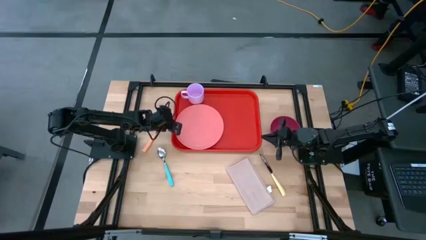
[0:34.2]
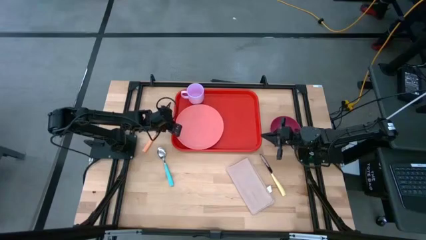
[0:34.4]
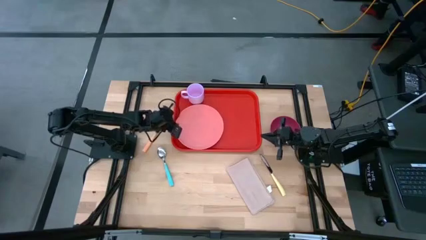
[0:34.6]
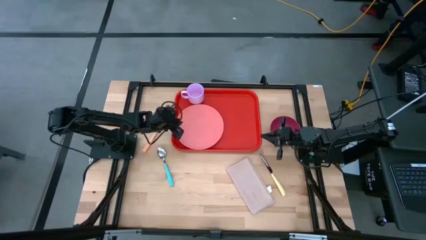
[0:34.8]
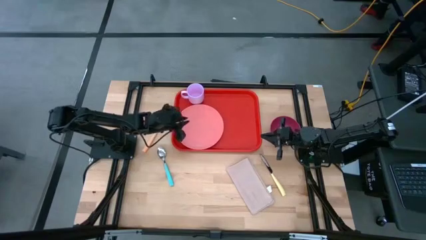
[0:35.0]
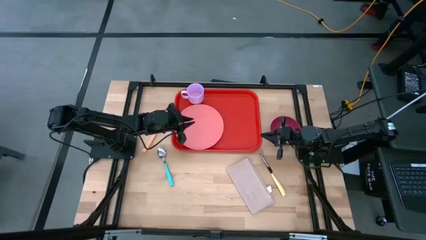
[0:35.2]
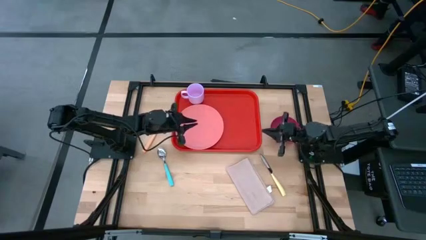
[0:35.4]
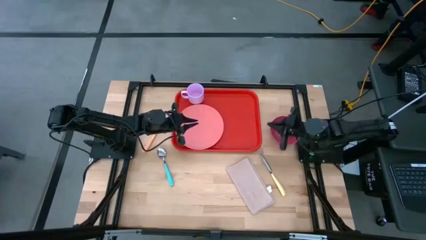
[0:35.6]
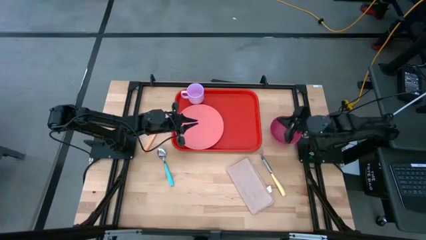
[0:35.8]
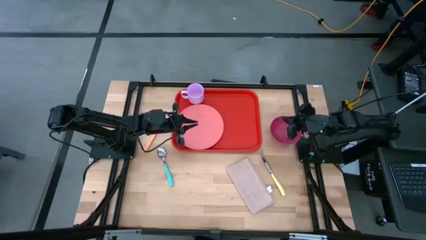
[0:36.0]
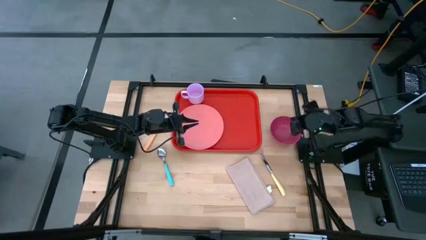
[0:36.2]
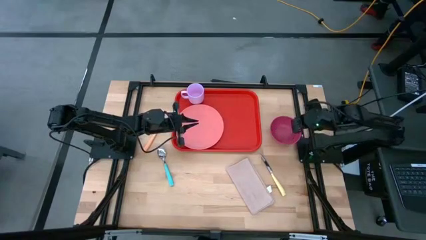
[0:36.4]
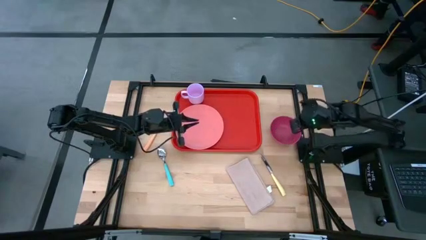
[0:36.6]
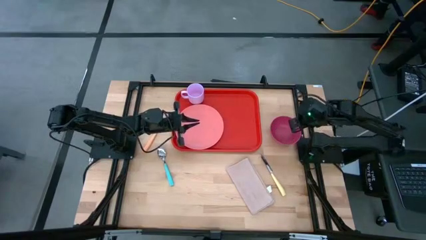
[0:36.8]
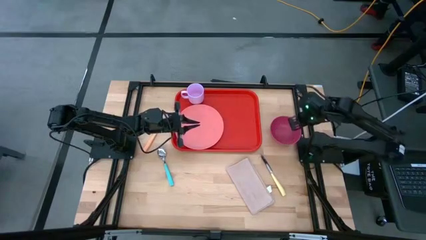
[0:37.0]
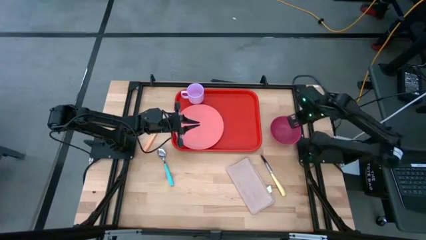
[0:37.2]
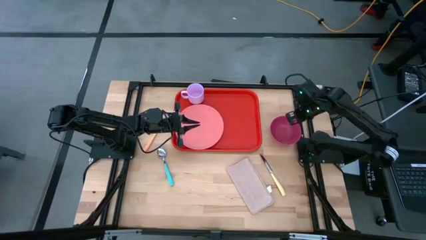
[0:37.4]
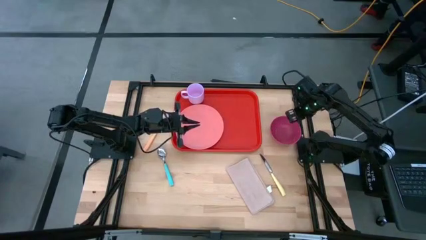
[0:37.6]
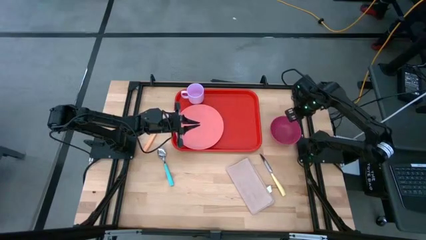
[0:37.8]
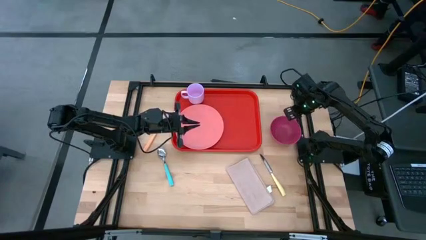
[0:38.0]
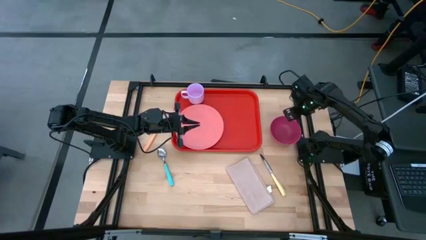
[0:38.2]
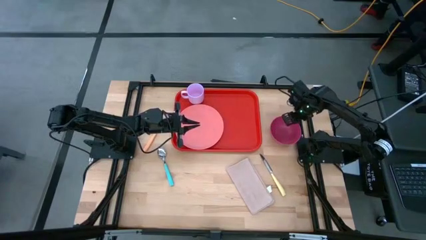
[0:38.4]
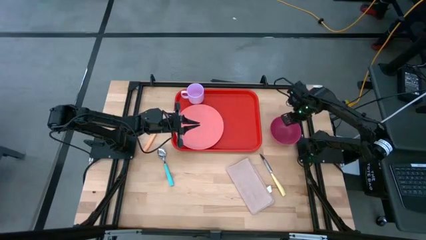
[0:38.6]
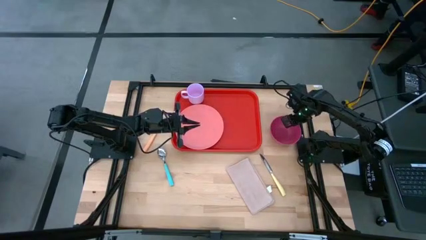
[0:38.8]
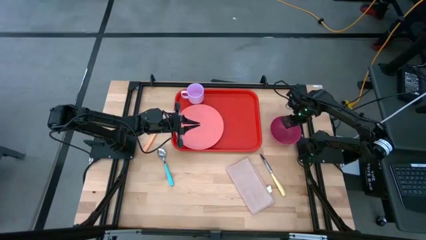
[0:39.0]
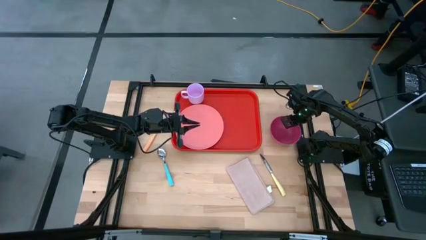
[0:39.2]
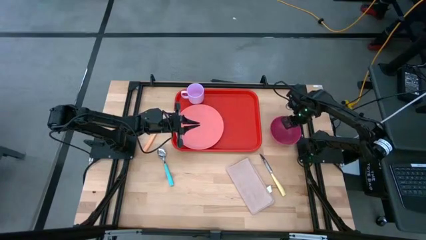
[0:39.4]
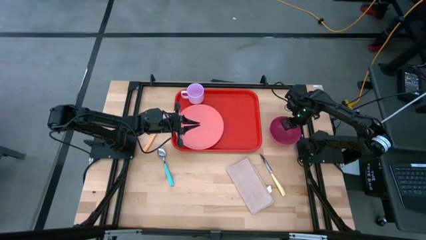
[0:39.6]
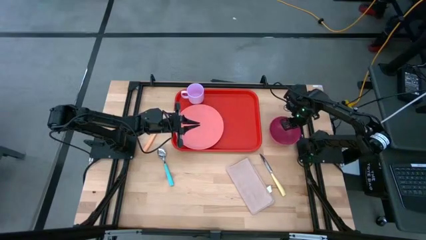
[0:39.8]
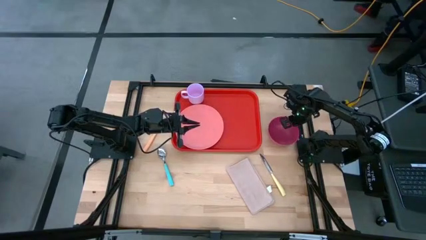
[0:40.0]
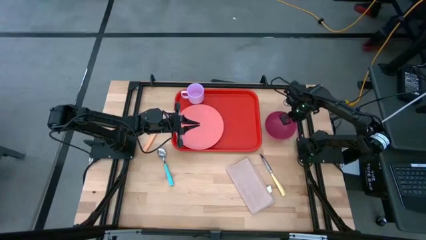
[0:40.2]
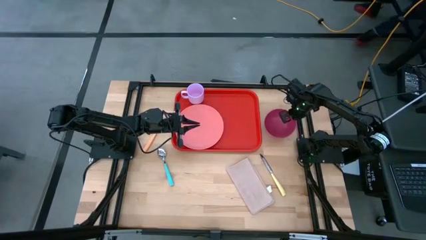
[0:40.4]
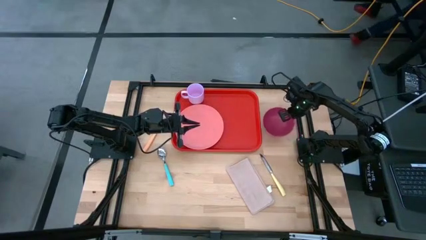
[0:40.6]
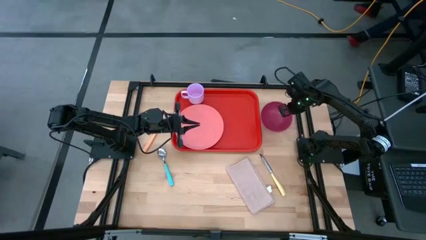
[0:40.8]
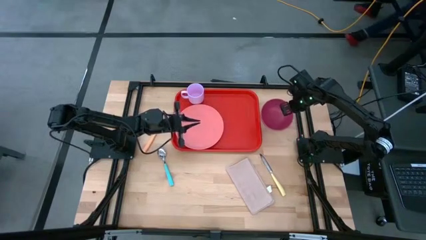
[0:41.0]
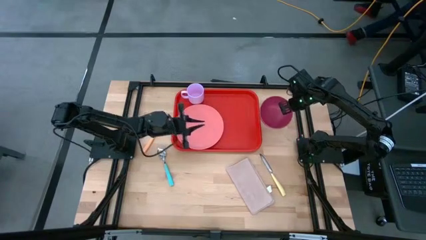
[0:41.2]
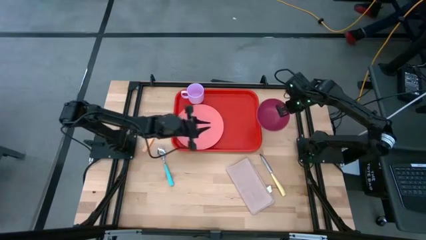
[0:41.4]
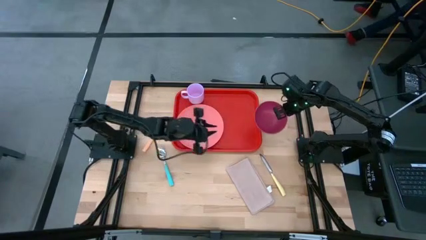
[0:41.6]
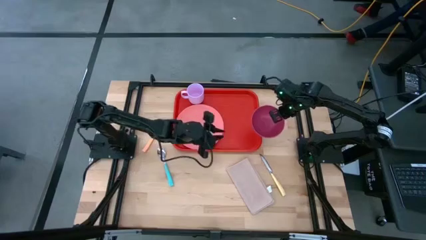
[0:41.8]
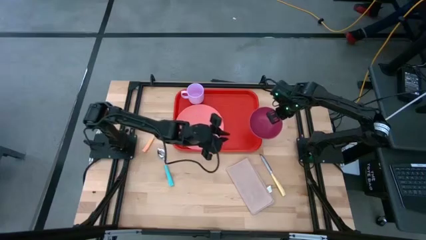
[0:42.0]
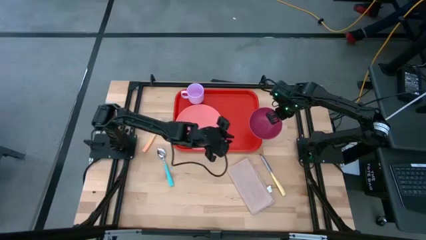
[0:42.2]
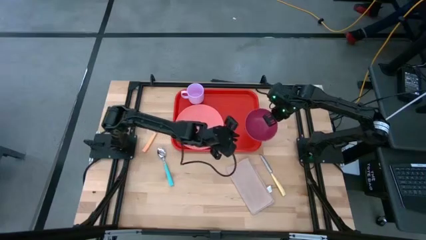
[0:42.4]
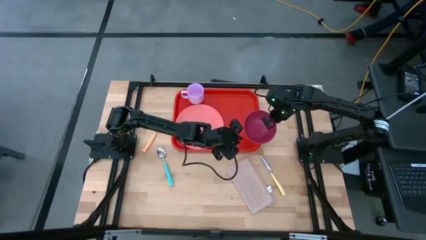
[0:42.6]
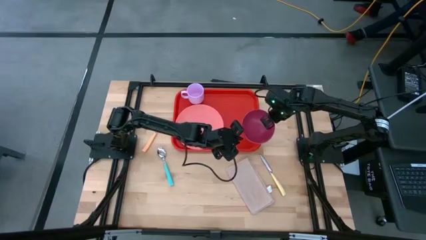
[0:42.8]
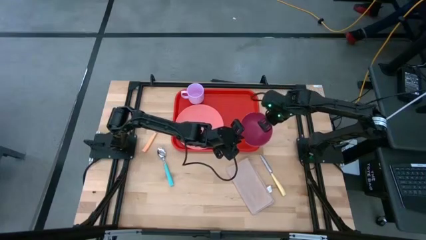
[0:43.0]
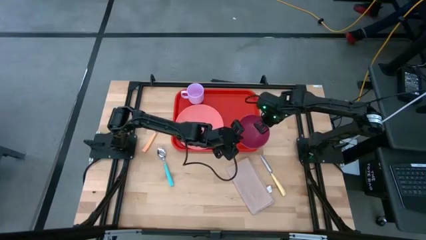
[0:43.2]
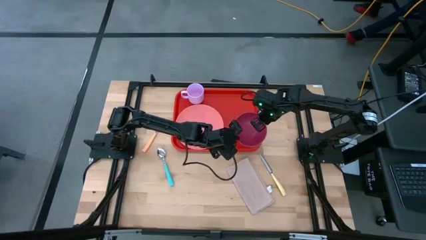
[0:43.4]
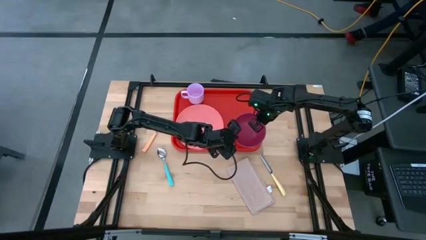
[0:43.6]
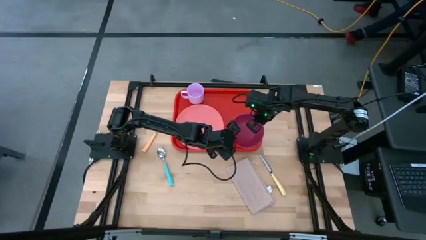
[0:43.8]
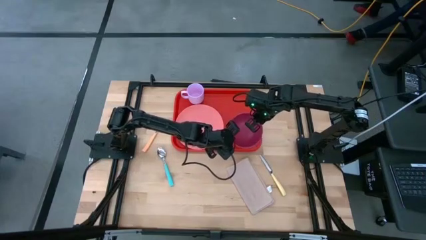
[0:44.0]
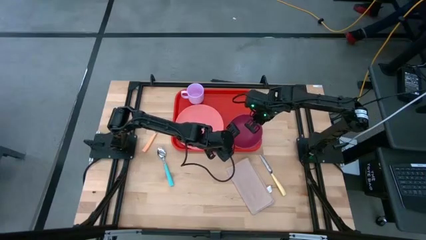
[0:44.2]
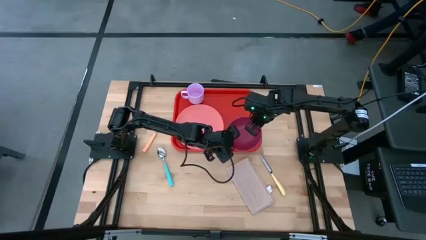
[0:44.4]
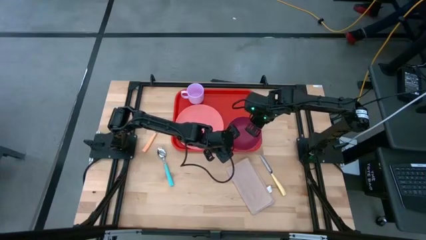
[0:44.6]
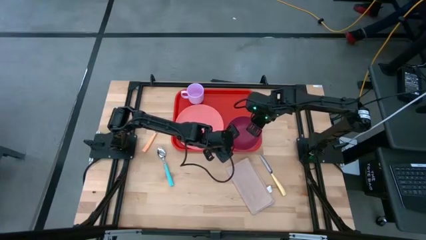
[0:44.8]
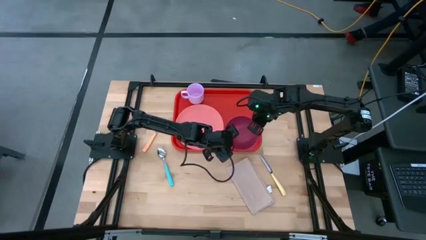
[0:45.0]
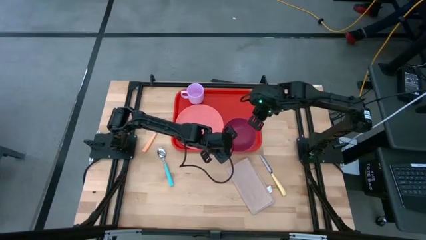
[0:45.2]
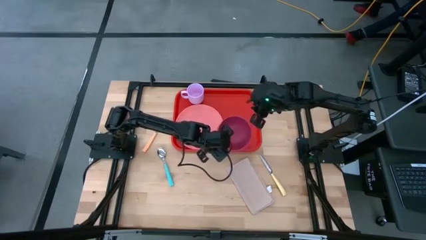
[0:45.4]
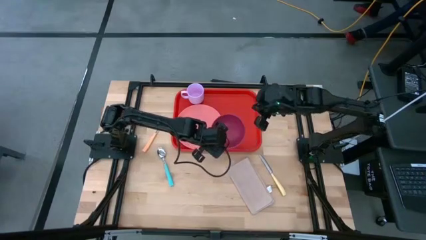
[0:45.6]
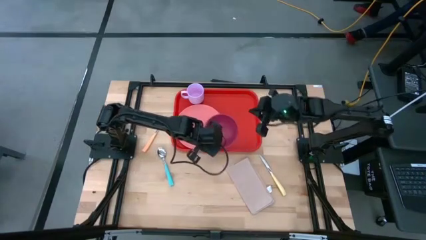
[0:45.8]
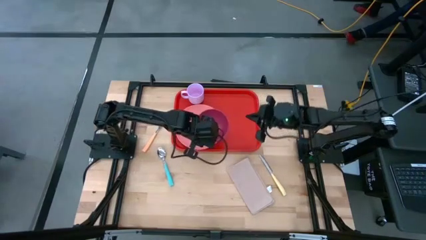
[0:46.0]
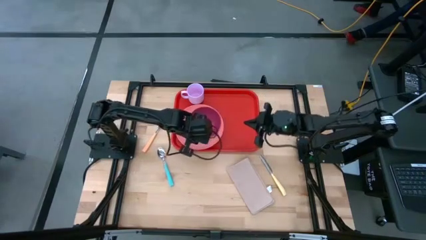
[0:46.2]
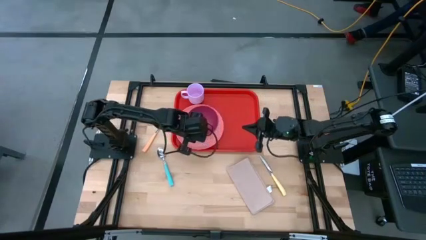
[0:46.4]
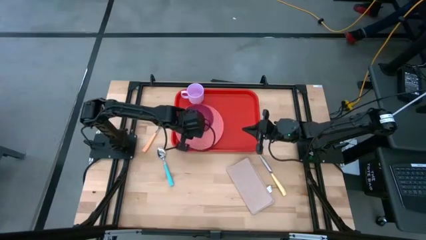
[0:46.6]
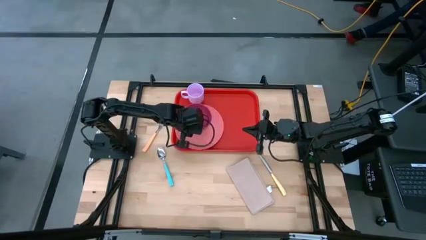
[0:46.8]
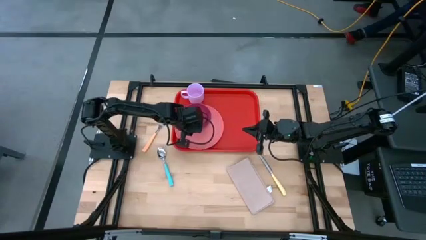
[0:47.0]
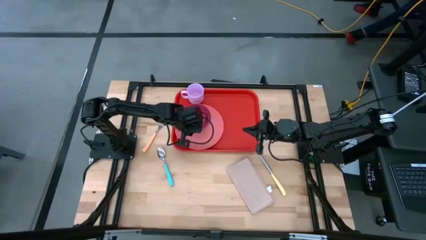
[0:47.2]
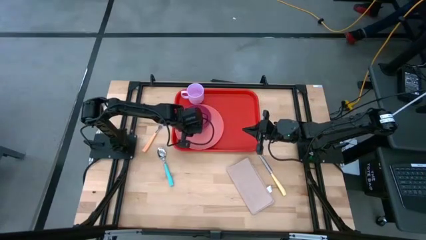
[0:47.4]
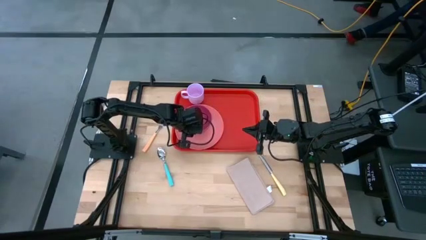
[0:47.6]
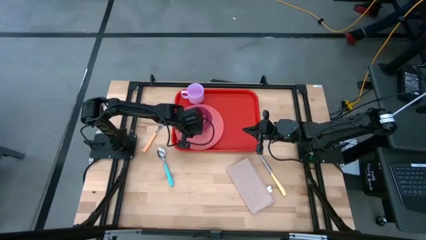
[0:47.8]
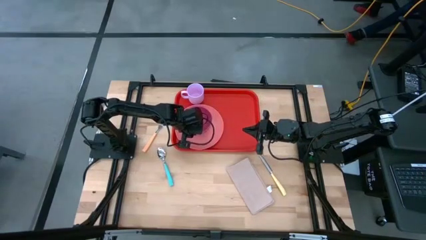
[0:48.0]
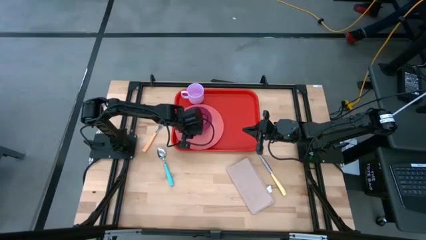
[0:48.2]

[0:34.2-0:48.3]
Task: Set up tray
Put the dark pink bowl on the light pink plate

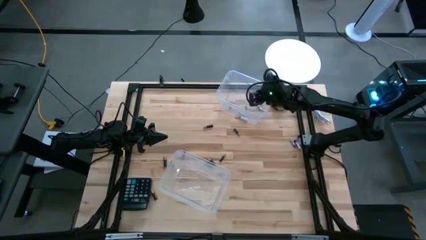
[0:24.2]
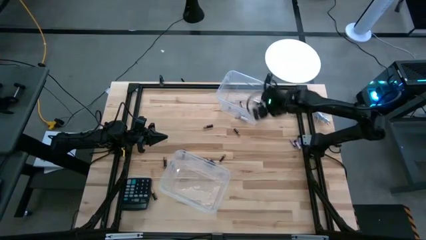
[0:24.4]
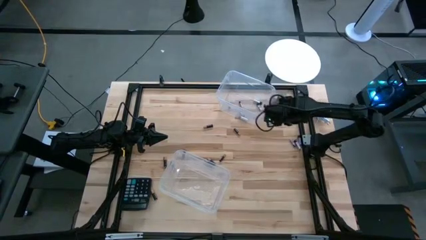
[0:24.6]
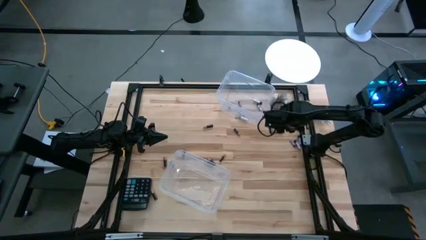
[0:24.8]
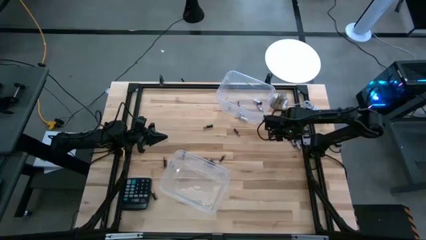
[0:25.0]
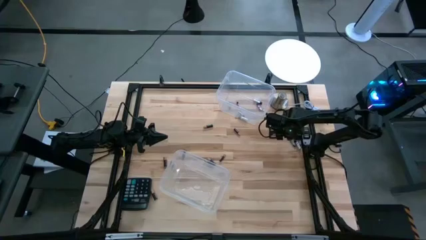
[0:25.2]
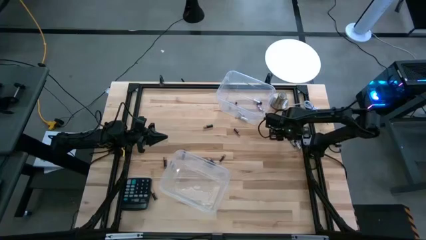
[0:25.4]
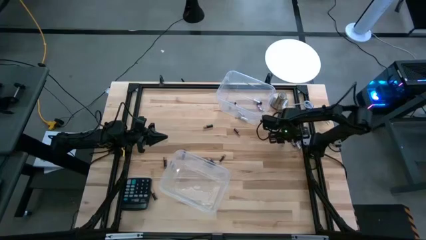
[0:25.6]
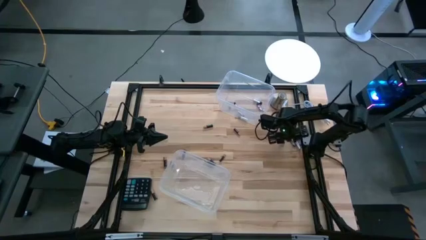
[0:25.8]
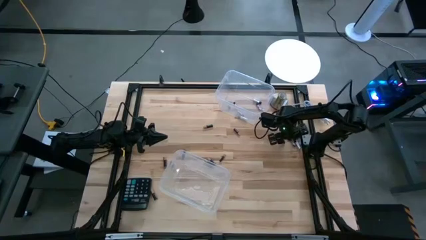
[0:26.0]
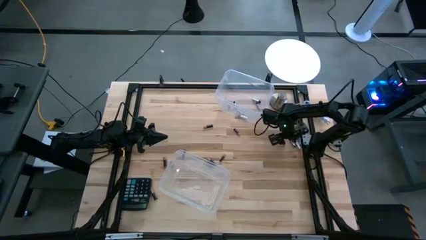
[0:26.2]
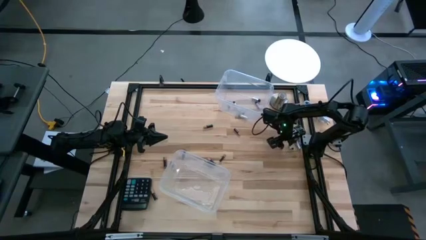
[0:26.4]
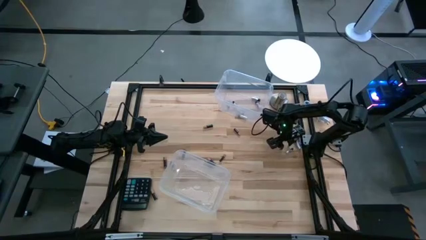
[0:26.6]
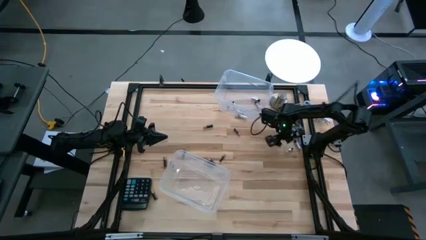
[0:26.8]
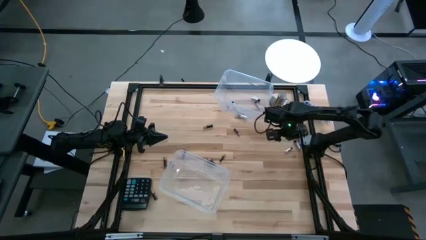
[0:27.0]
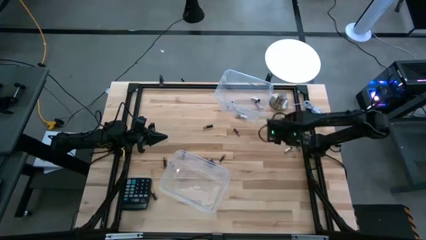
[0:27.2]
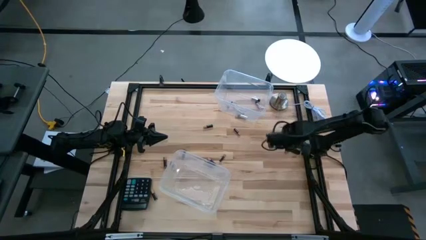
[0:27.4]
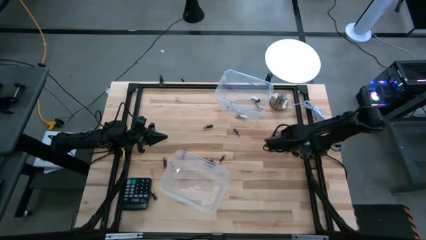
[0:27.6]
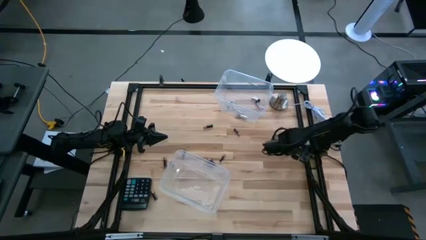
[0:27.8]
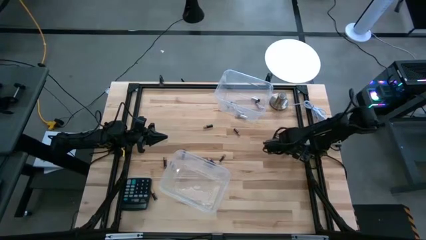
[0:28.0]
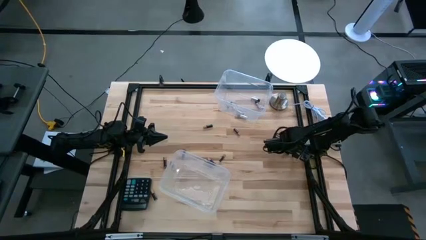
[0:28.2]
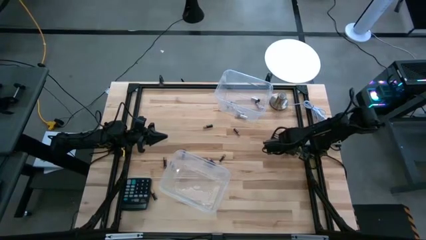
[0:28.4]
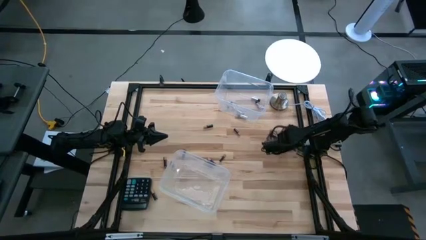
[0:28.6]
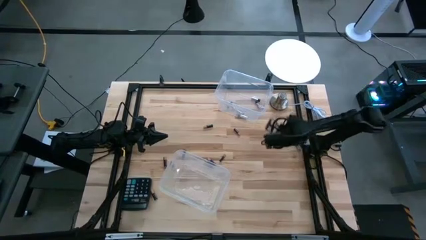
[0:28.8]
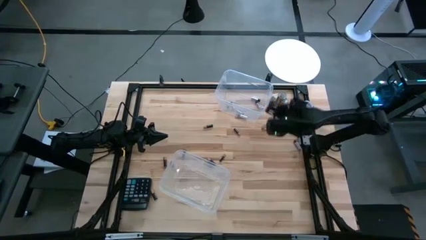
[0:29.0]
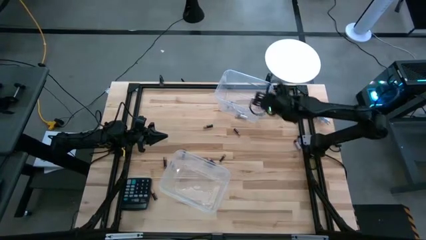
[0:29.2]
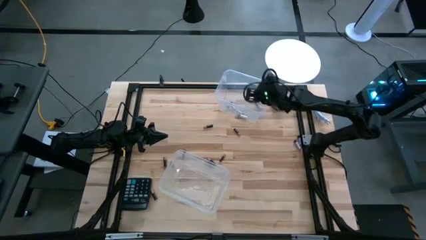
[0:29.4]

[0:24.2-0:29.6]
Task: Sort batteries
Put the silver battery into the top transparent bin
